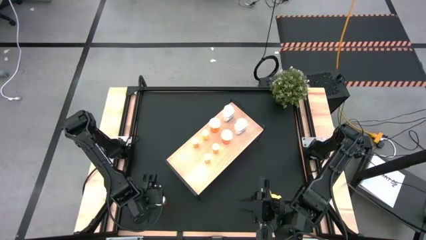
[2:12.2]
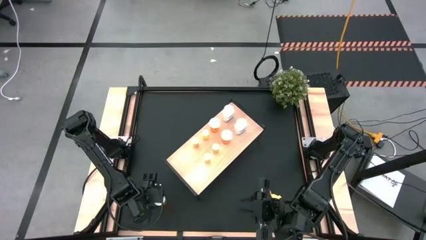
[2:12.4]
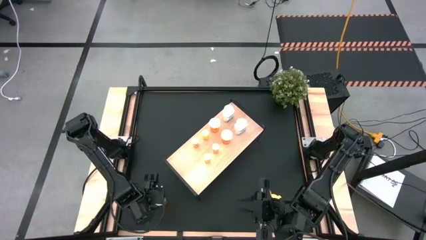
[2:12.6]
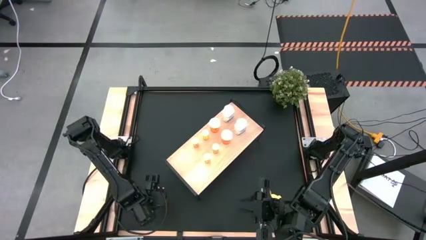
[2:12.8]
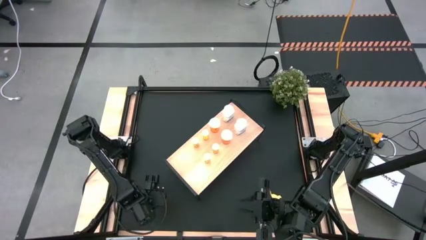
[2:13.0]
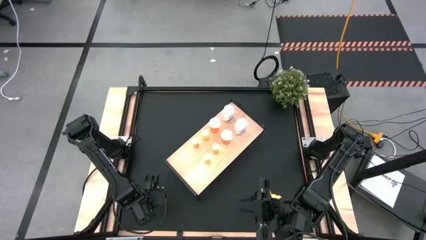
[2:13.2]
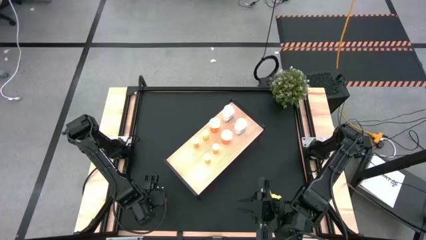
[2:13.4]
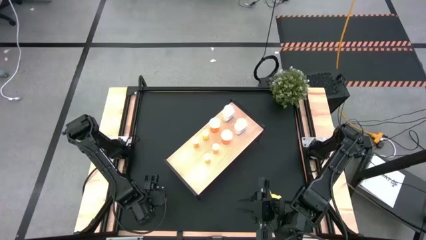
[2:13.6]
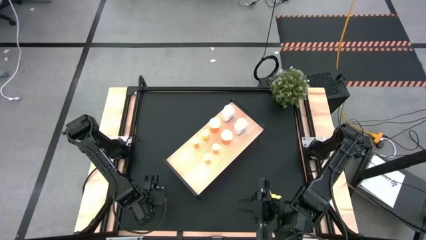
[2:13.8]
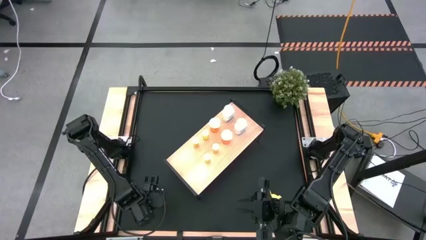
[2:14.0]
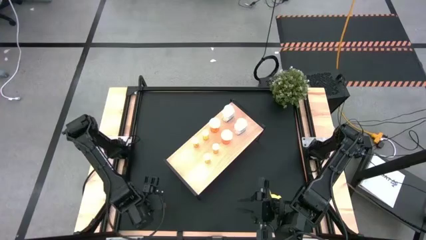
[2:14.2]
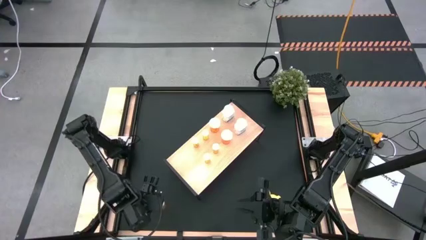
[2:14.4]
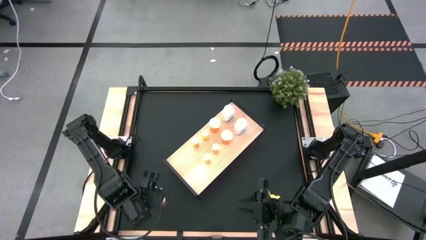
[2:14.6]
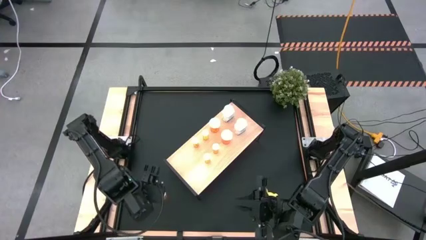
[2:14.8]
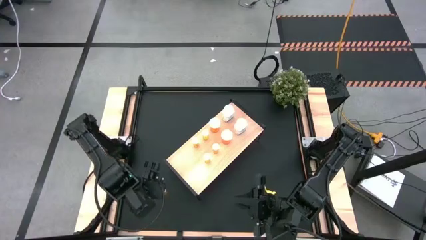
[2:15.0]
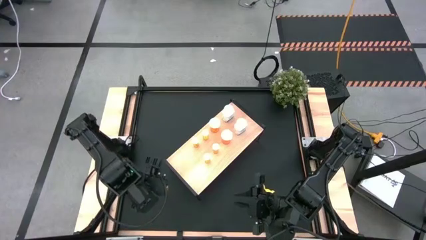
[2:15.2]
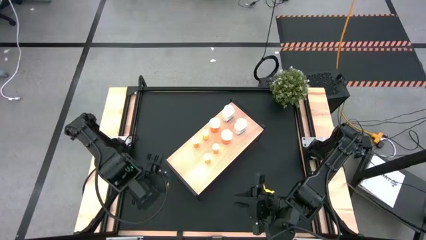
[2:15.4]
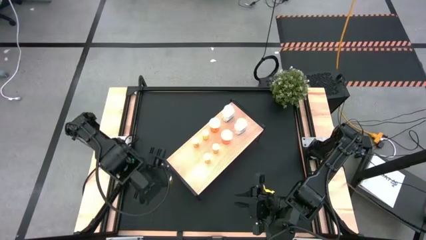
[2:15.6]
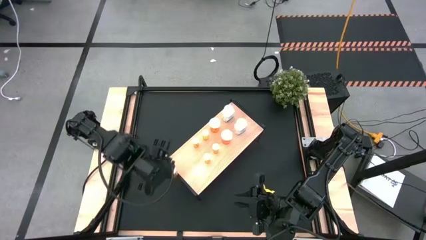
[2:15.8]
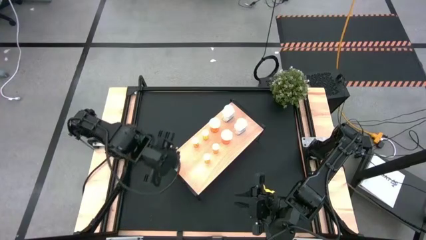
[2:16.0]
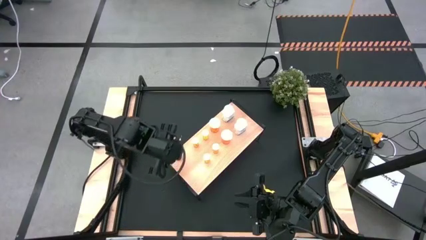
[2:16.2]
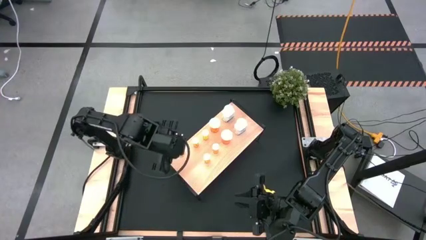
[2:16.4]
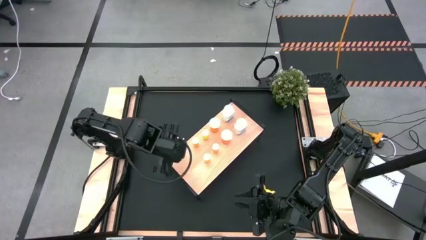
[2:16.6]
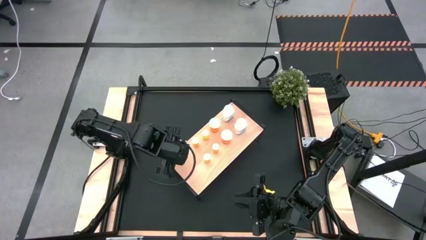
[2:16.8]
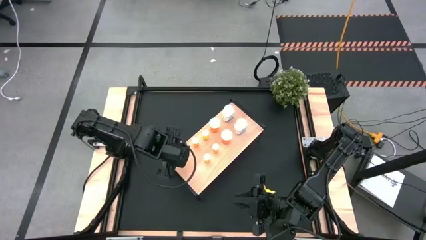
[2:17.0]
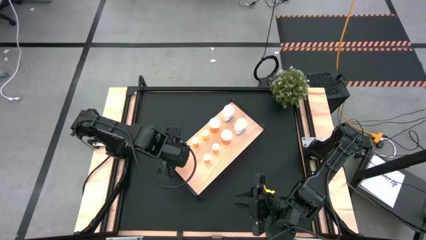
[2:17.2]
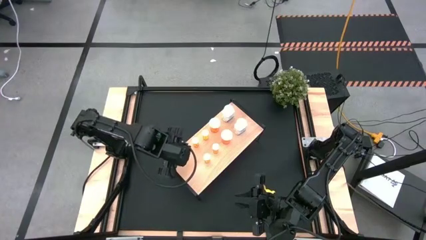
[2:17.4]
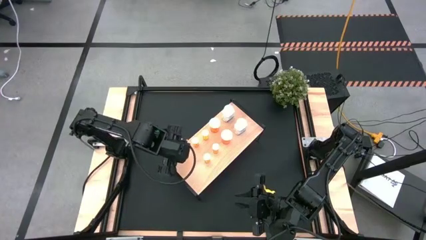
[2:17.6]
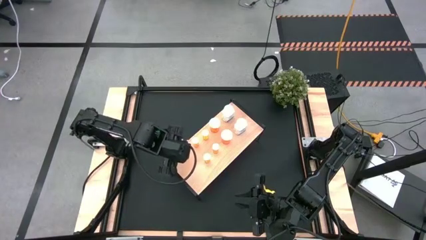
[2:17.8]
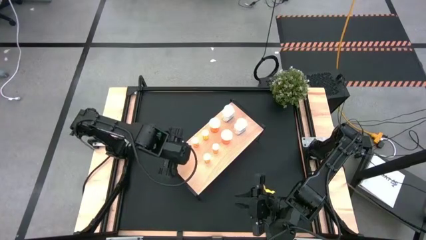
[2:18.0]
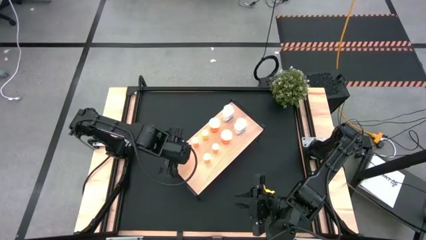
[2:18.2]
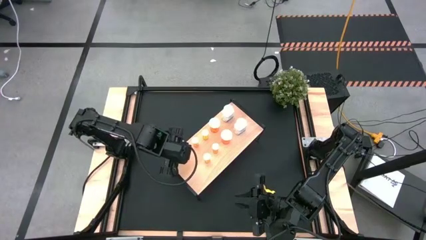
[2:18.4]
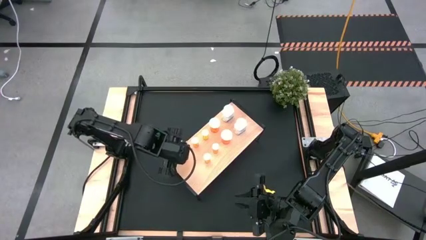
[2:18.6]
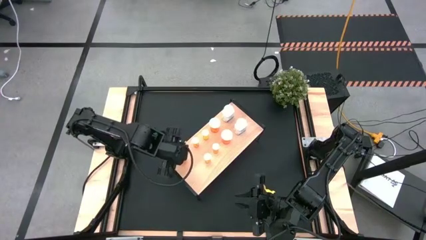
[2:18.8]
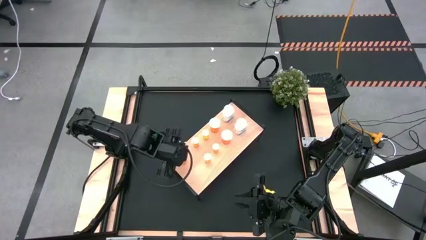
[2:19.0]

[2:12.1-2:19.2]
Task: Pick and place medicine bottles onto shelf by color
Put the large orange pill bottle on the shelf

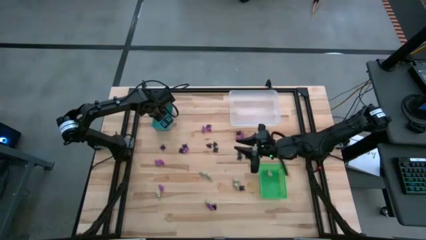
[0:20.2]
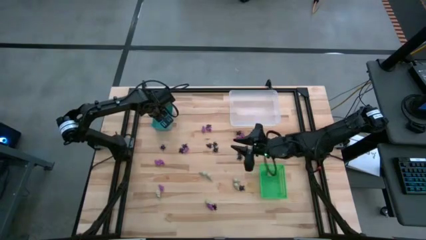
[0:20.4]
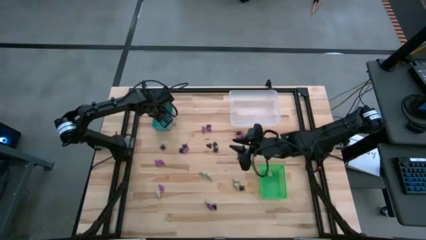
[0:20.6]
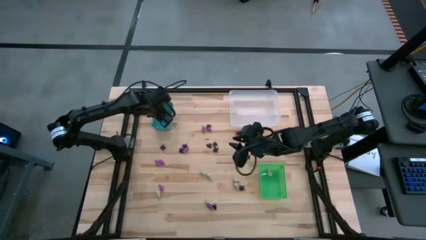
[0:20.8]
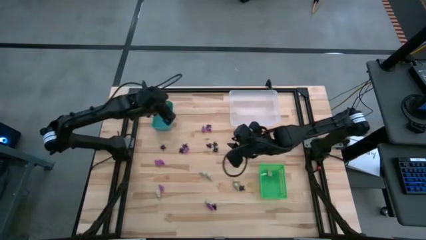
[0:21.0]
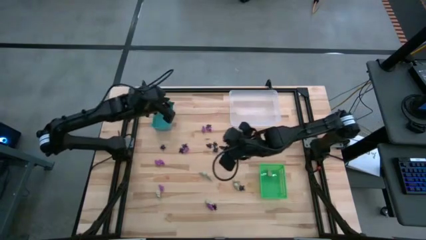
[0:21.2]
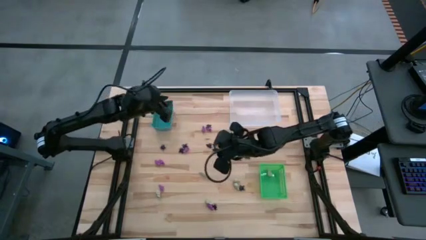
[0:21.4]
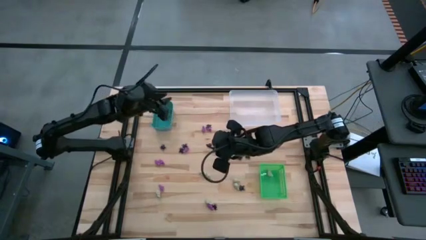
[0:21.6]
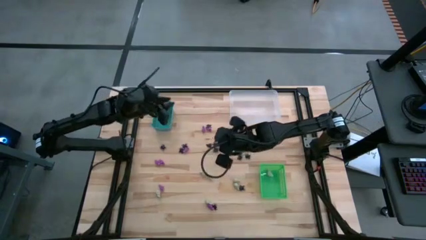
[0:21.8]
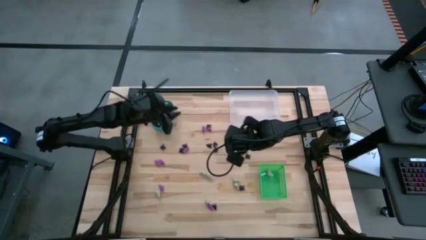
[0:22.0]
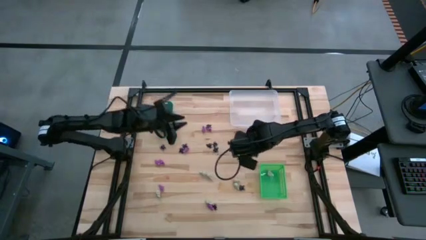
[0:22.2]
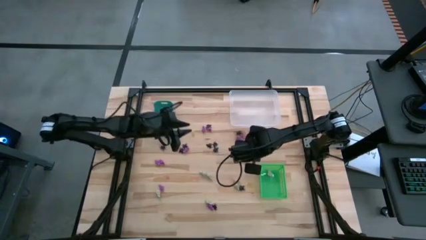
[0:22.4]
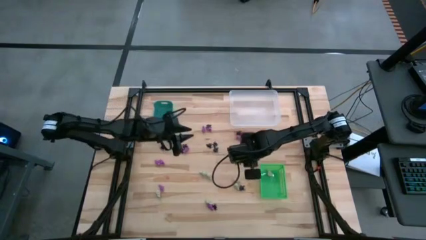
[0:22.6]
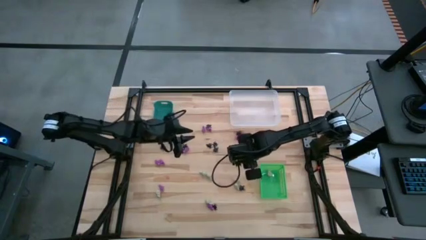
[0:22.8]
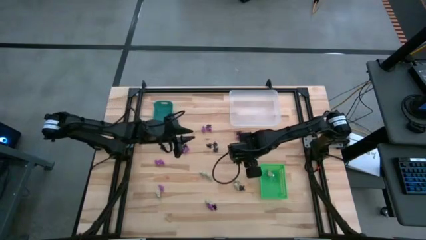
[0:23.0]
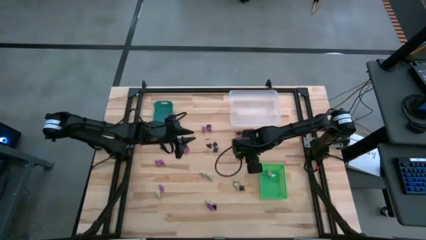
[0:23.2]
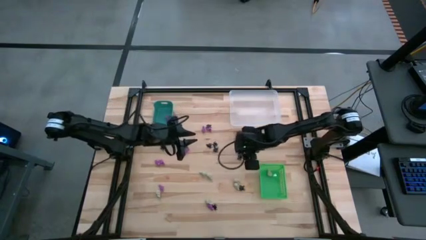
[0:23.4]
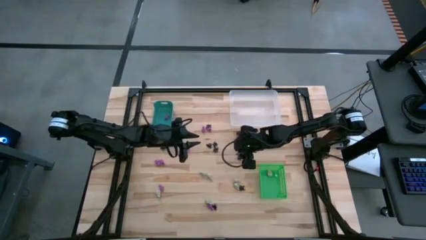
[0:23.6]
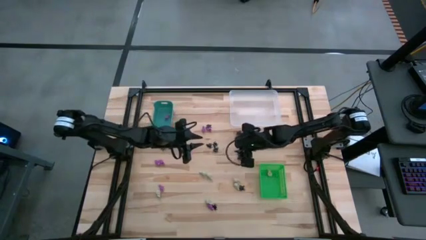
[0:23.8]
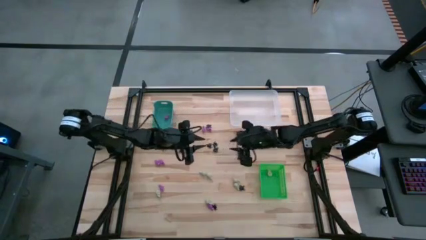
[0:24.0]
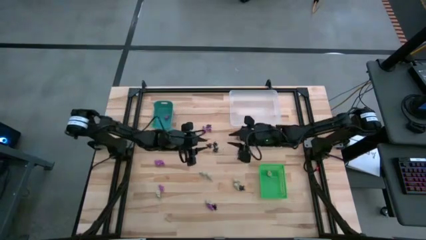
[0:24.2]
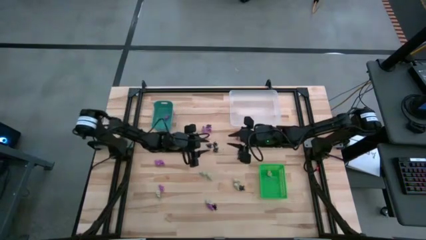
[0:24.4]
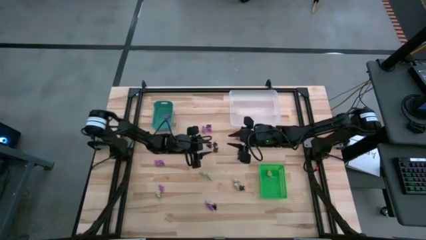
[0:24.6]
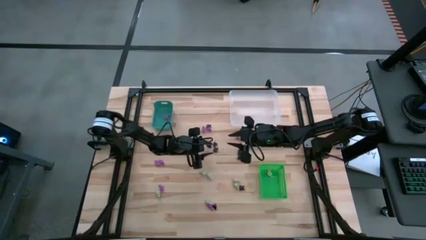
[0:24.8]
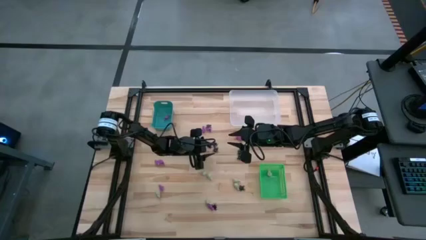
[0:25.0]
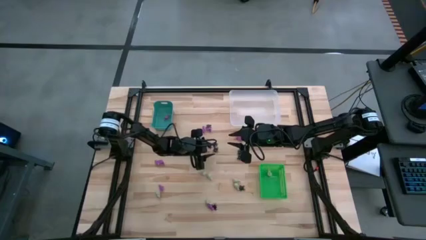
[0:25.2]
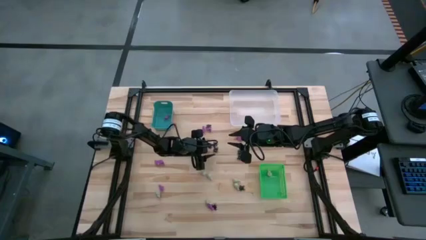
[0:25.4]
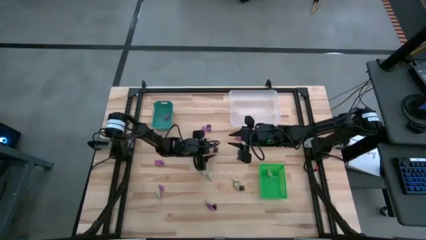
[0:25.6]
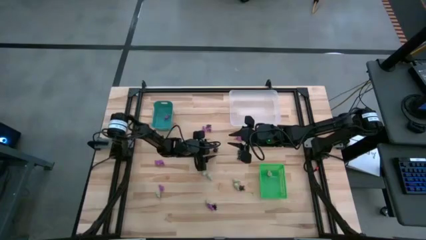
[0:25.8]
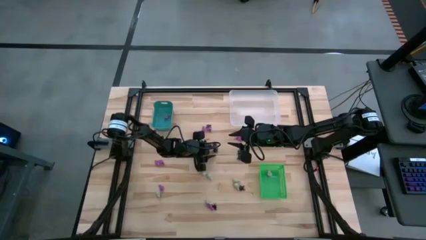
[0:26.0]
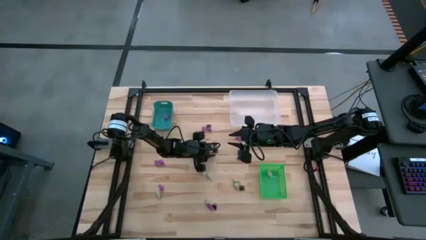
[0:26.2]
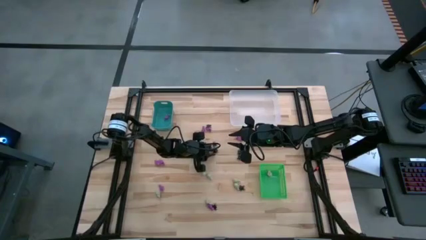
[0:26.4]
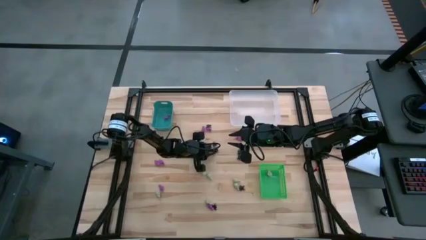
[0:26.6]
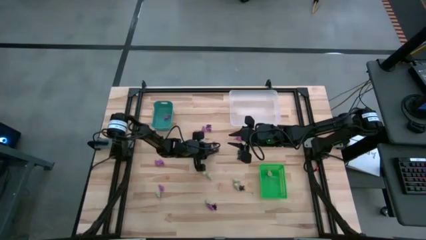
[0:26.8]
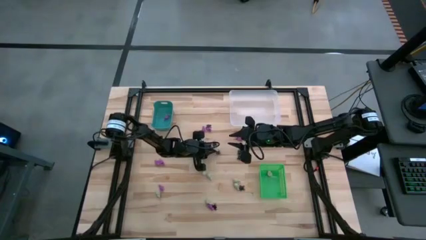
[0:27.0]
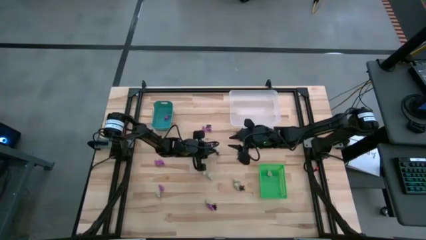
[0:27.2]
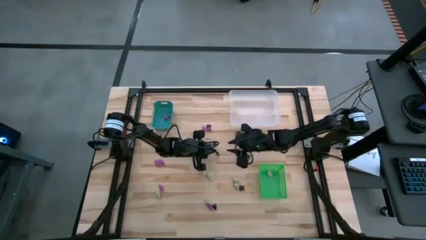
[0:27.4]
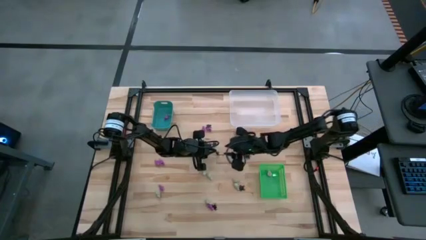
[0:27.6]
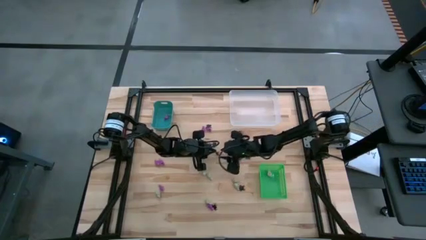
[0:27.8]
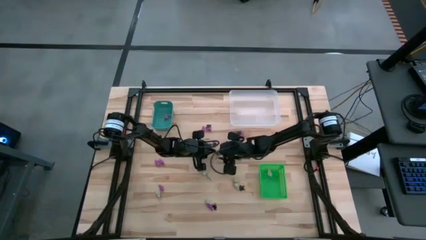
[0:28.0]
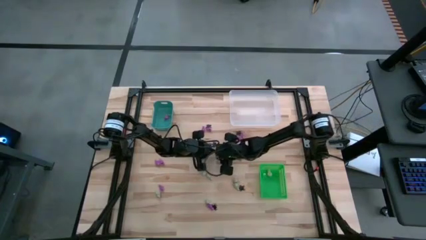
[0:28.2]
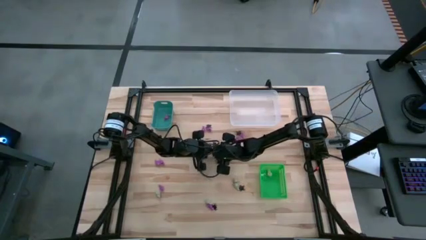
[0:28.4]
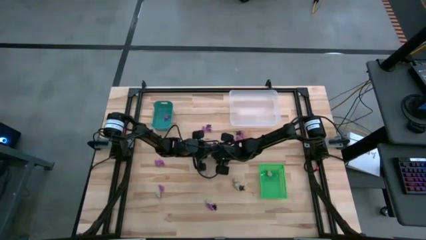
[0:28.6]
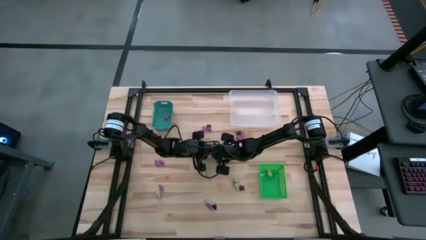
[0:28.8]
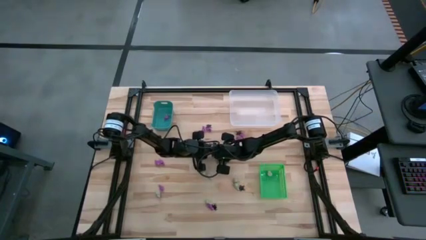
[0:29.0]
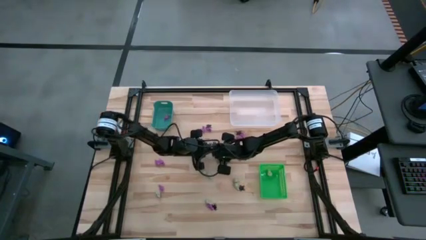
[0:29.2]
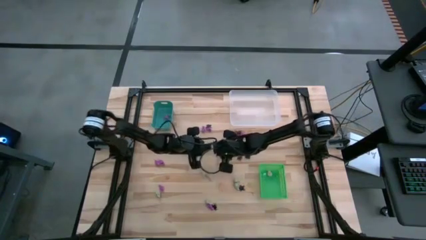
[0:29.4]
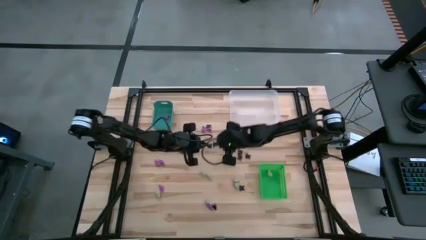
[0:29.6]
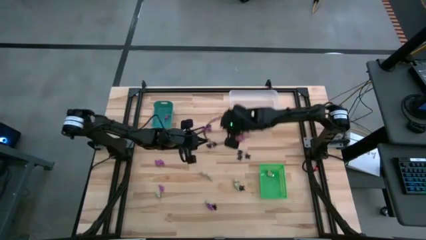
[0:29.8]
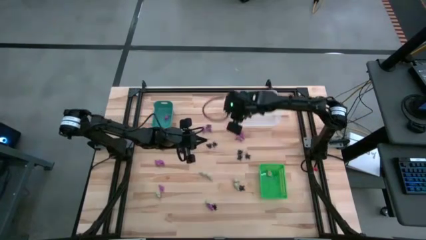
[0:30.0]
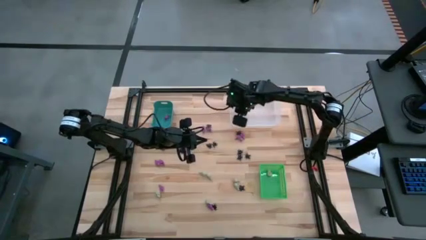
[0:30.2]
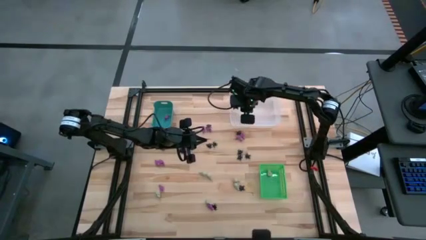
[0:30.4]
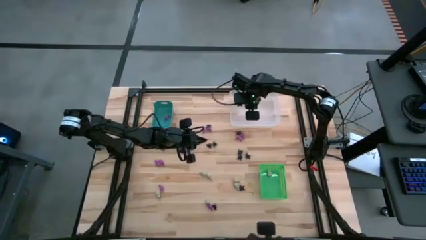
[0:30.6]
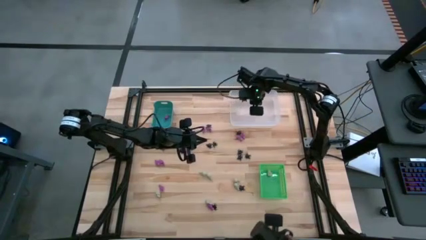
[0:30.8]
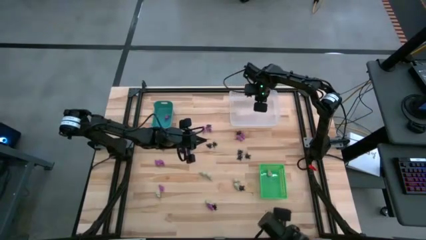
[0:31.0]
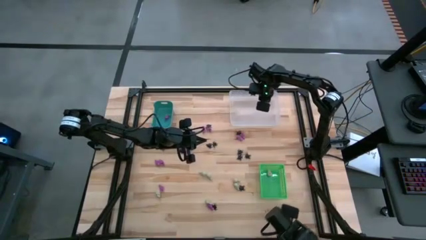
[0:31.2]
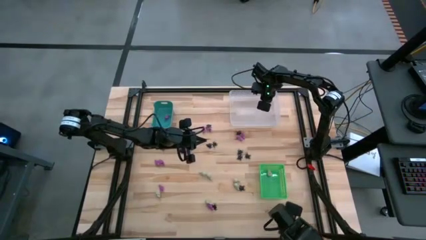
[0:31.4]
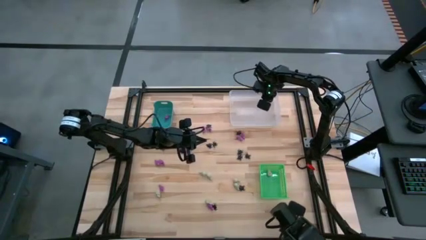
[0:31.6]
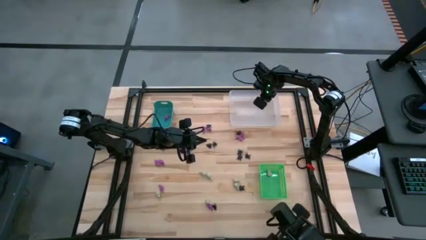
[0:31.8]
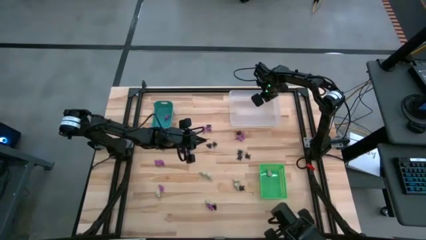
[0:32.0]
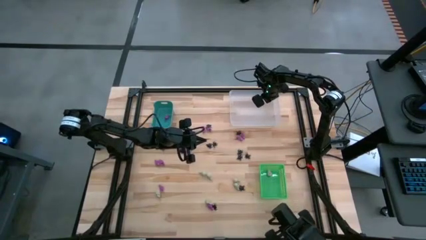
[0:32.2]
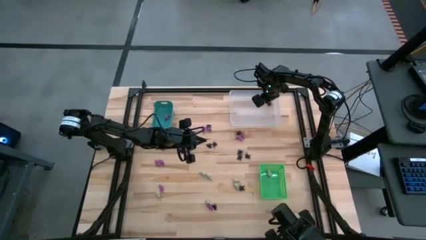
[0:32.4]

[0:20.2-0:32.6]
Task: Sort Halloween decoration
Put the black spider toy into the white bin
